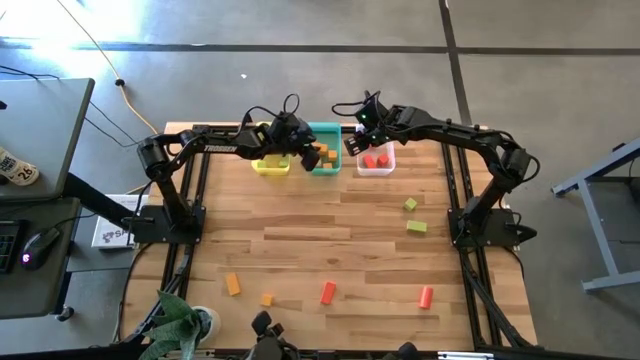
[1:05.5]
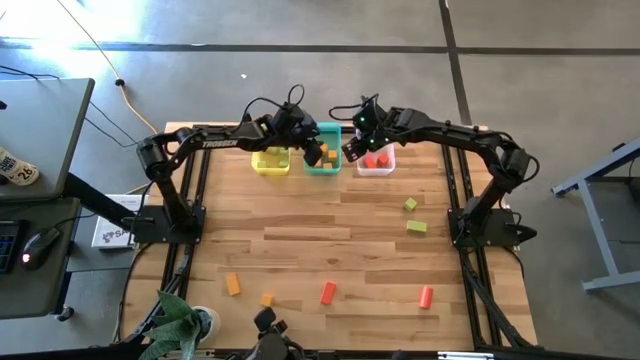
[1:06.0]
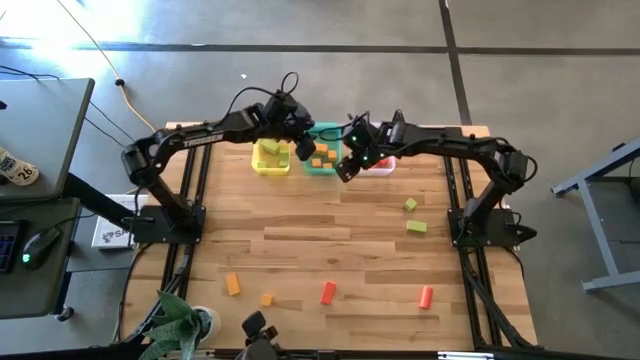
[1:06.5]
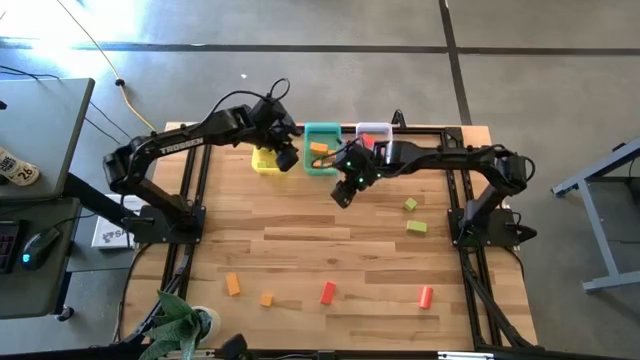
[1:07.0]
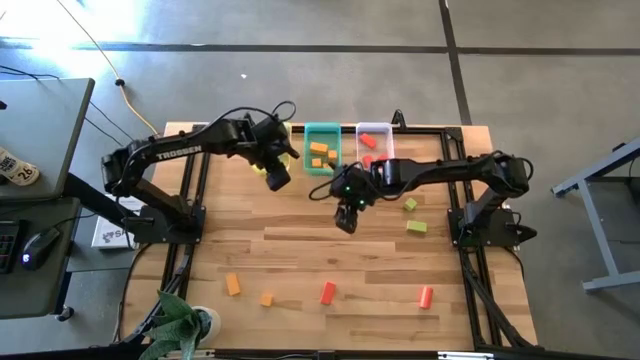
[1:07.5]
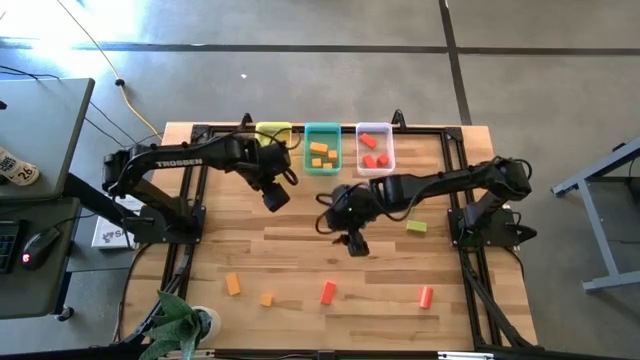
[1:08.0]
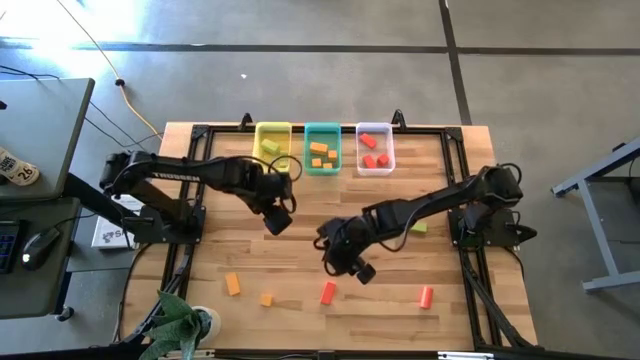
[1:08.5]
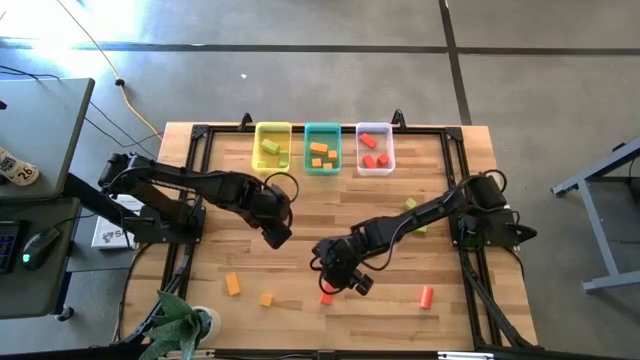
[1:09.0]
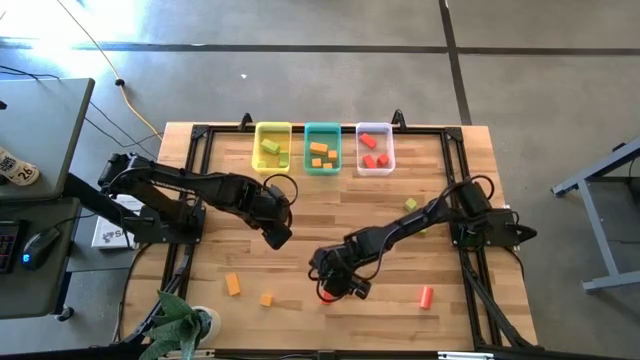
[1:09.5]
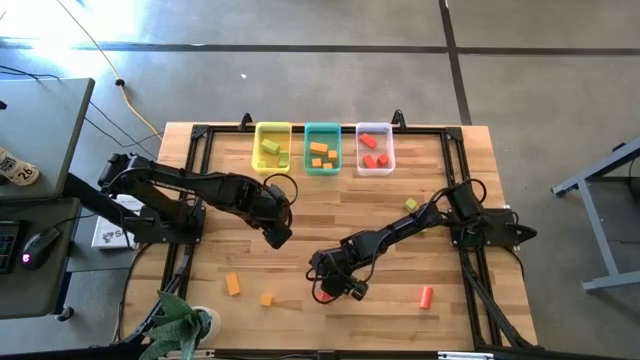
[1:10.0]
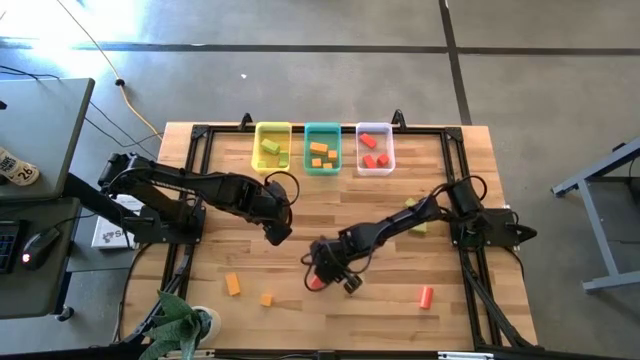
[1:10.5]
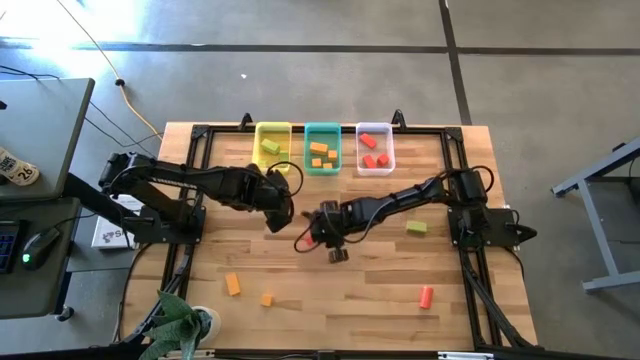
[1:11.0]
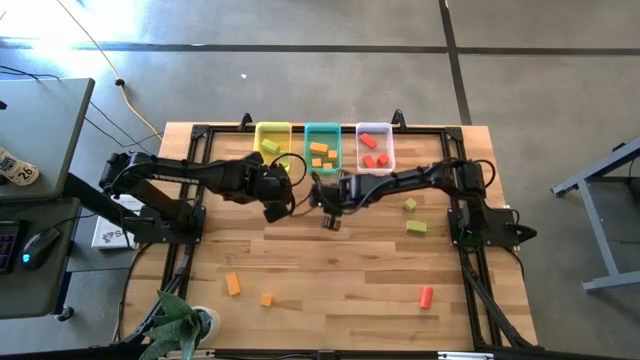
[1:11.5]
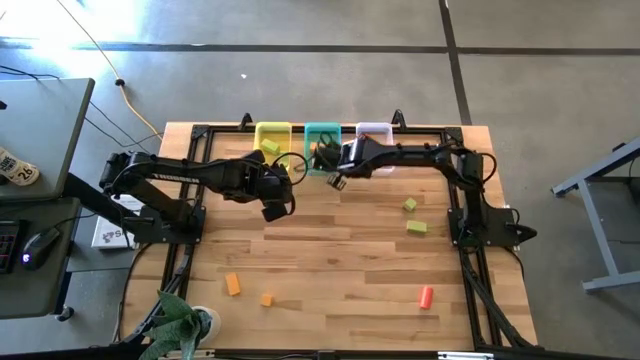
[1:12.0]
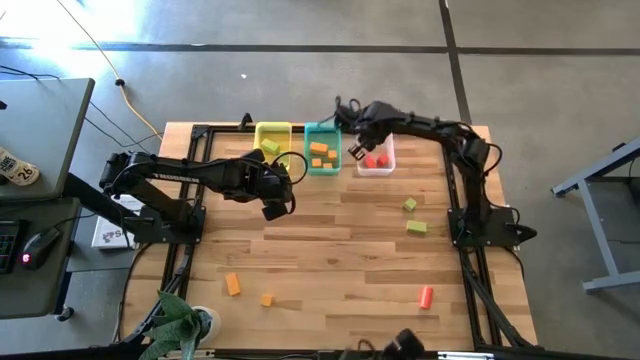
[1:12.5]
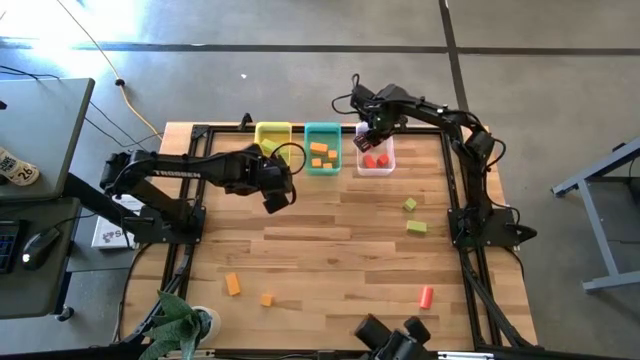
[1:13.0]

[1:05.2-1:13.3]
Task: Sort & place blocks by color
Put the orange block into the white bin

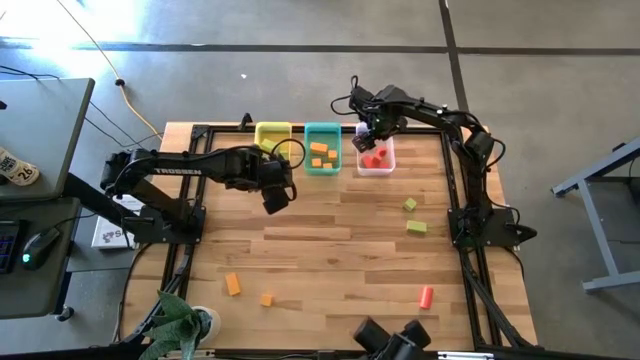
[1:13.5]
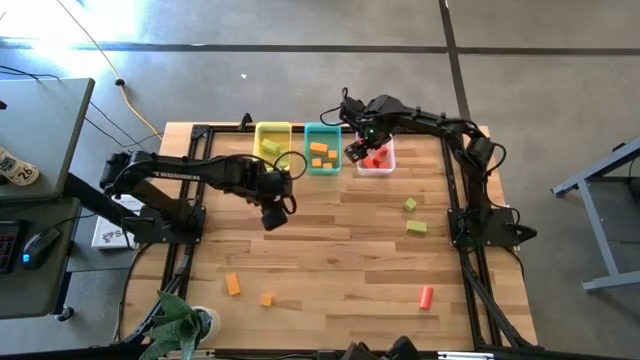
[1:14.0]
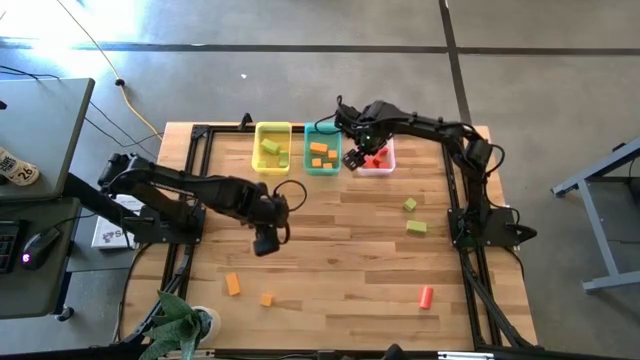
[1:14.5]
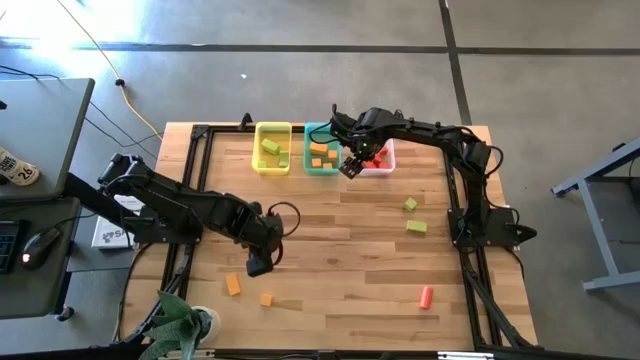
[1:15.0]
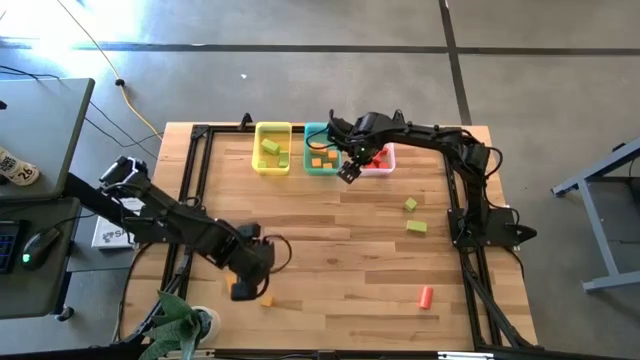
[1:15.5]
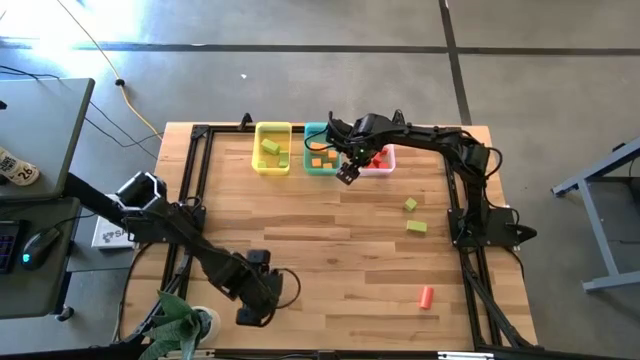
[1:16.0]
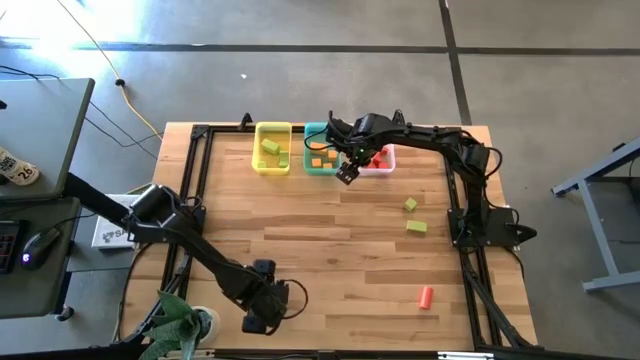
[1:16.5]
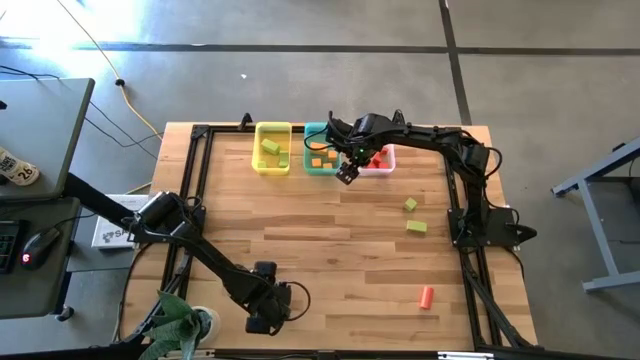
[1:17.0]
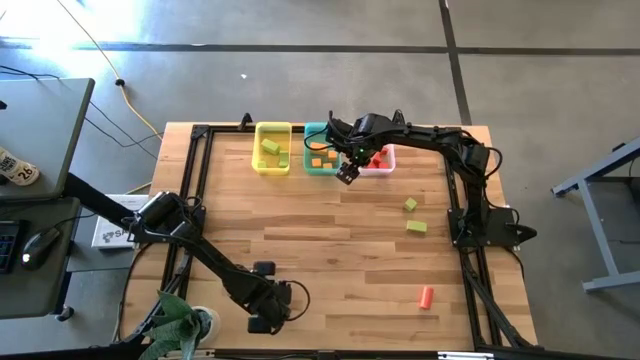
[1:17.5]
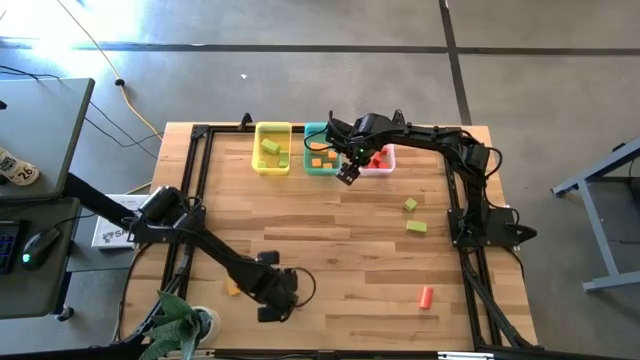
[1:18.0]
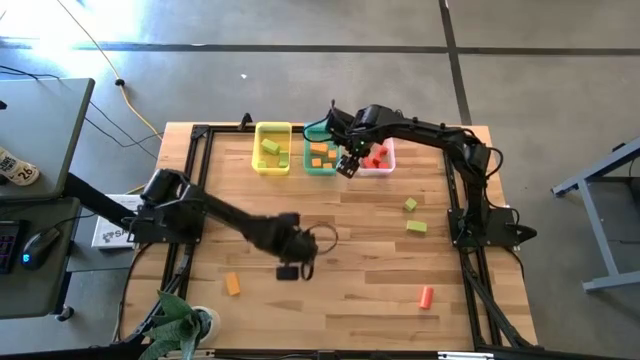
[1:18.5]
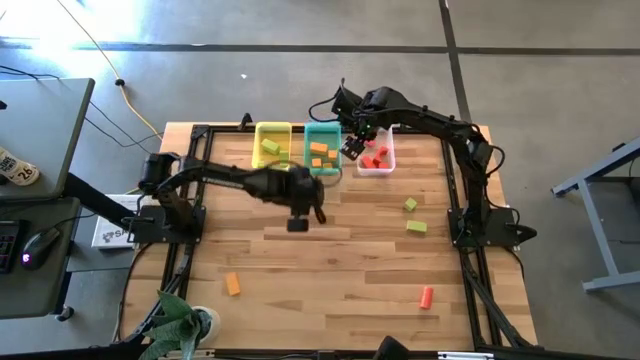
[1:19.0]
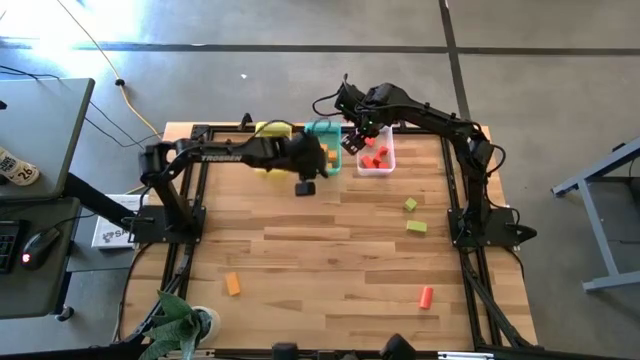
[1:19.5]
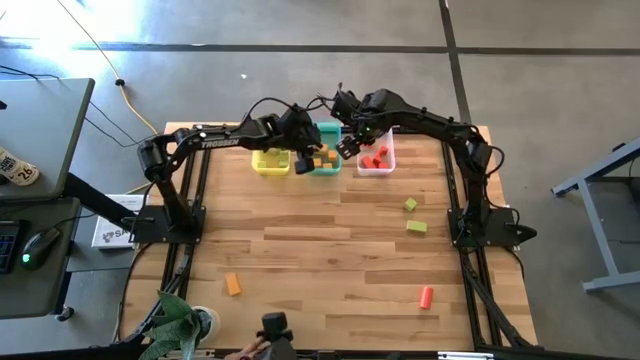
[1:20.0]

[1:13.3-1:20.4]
Put the yellow block into the blue bin

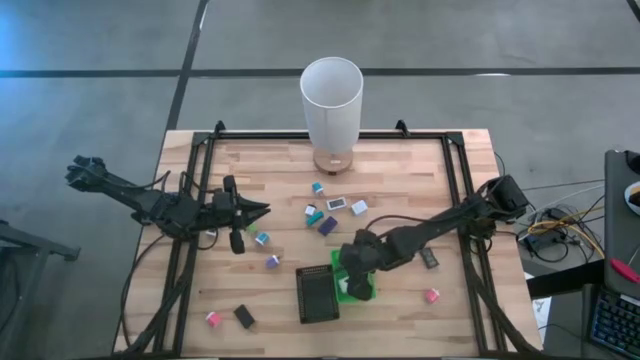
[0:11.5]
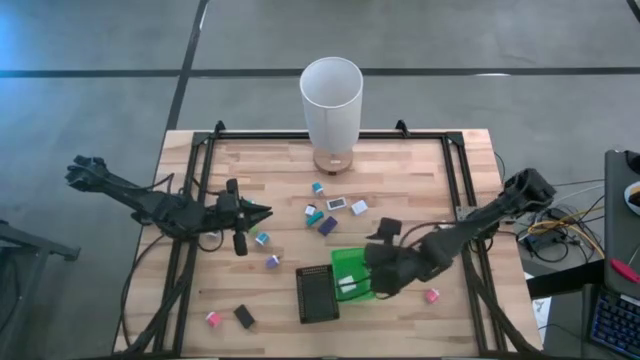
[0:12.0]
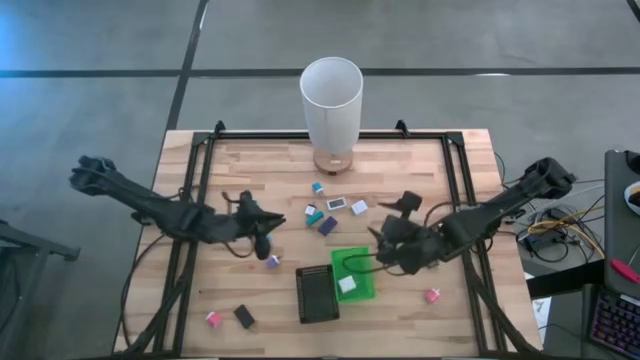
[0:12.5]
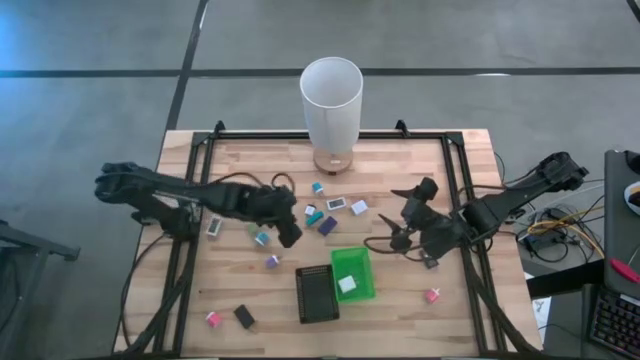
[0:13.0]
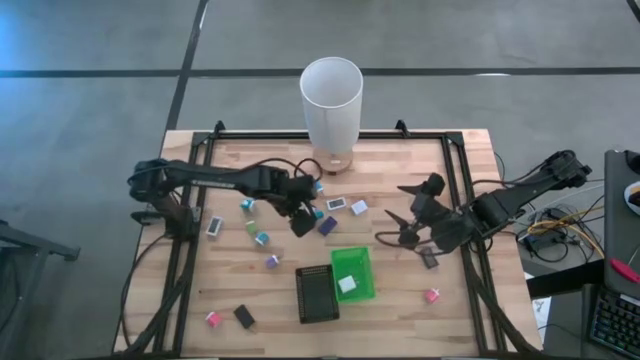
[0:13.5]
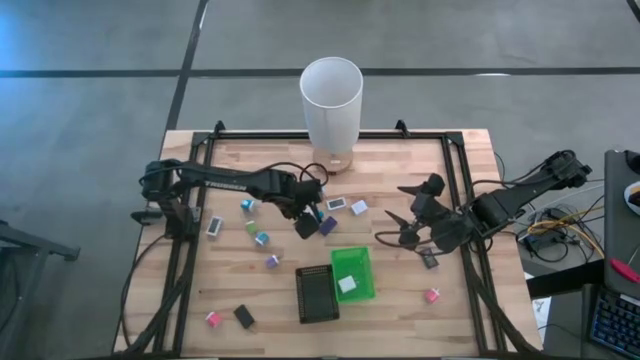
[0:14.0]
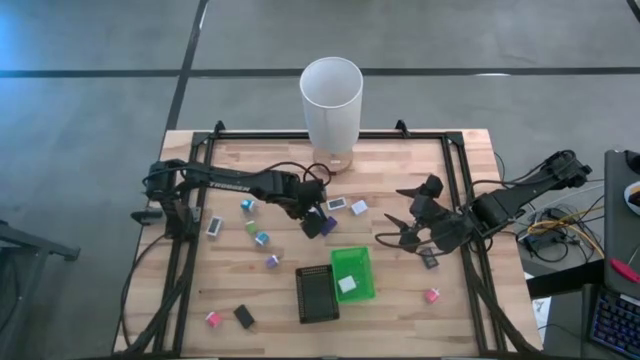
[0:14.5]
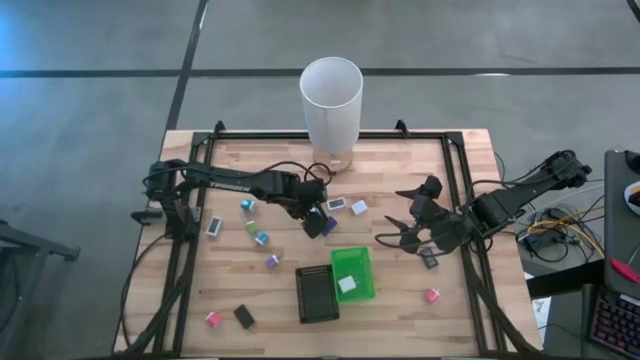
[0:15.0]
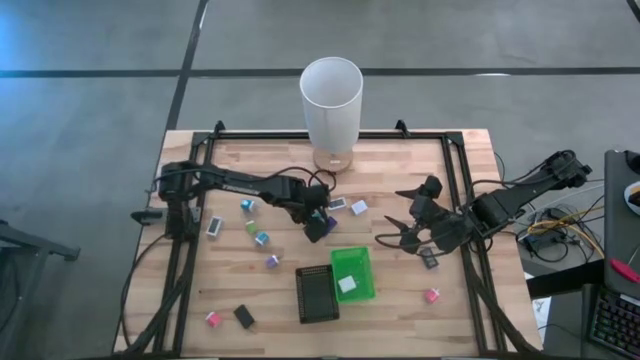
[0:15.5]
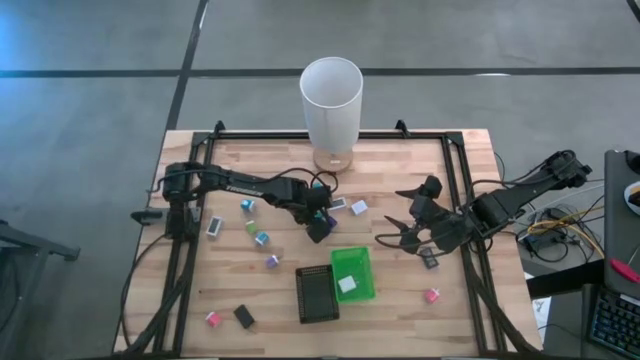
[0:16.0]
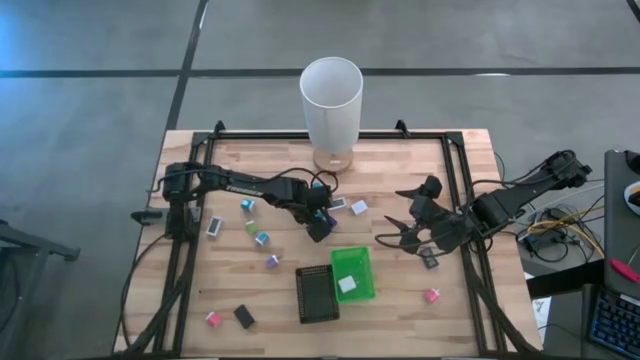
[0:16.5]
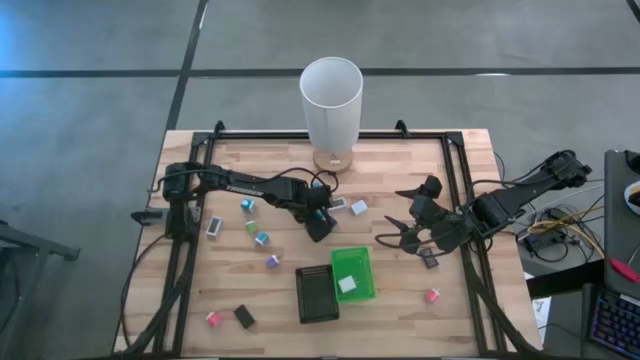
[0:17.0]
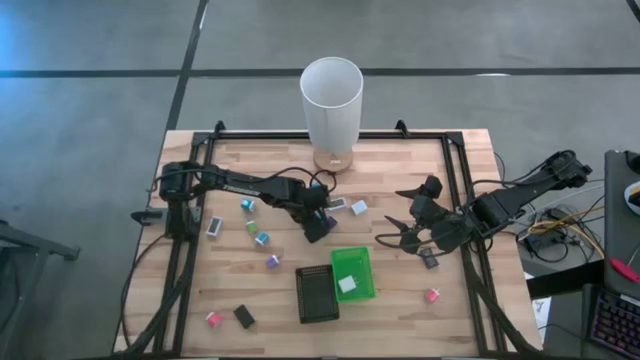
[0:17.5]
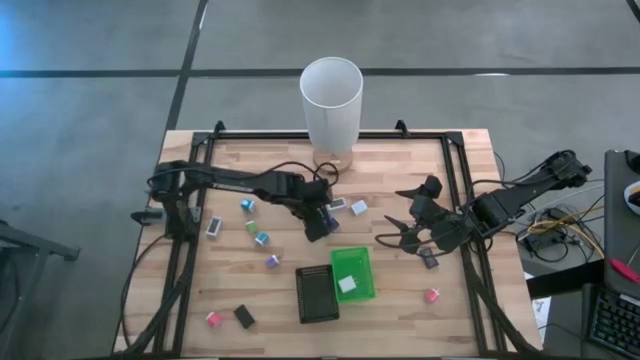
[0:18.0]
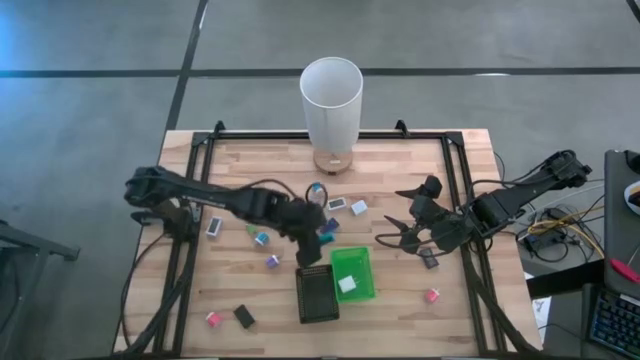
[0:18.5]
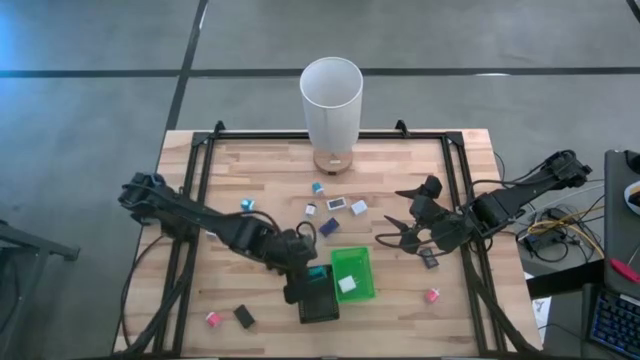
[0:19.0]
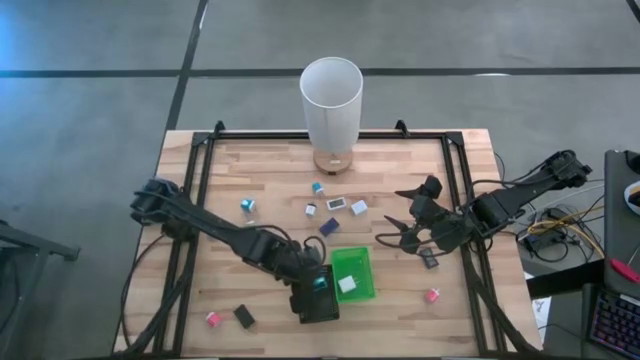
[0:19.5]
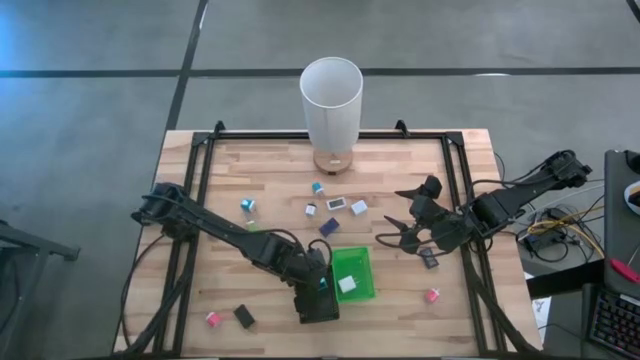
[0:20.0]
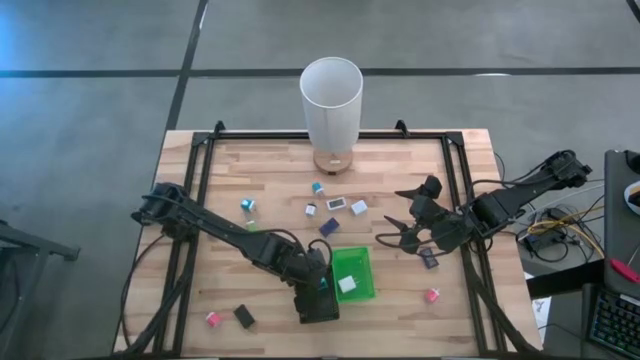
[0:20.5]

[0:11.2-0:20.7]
Task: Pick & Place Office items
Put the light blue digital clock into the black bin
